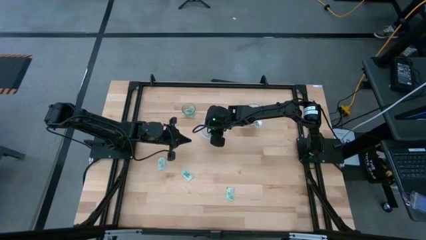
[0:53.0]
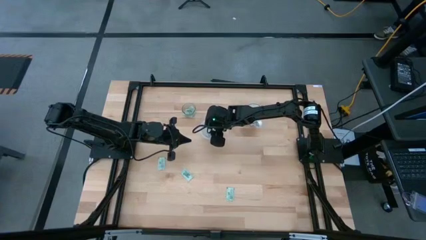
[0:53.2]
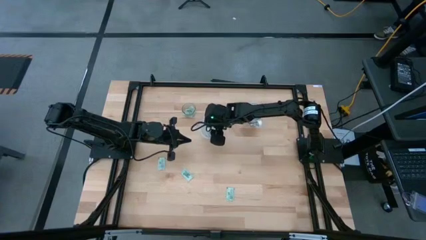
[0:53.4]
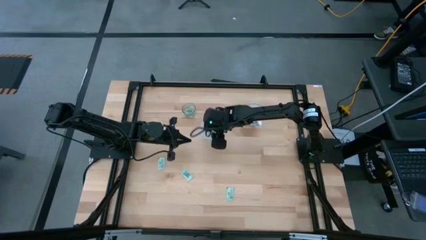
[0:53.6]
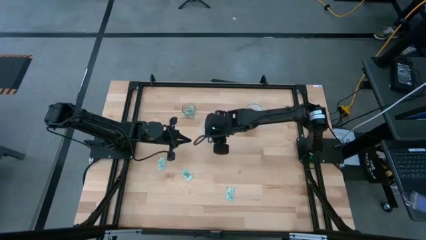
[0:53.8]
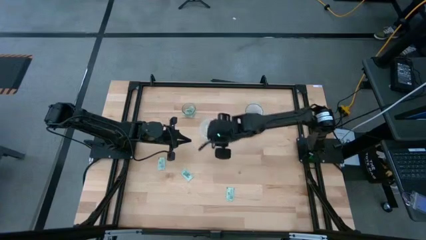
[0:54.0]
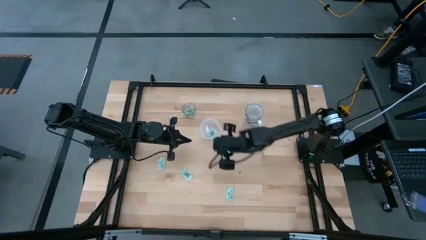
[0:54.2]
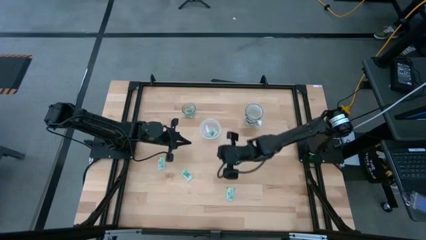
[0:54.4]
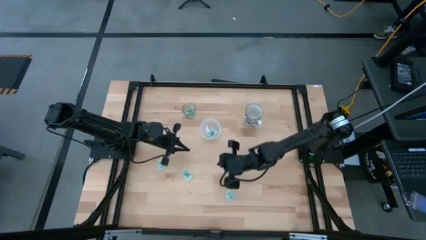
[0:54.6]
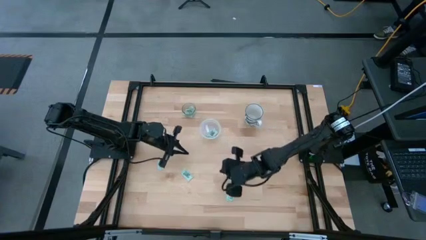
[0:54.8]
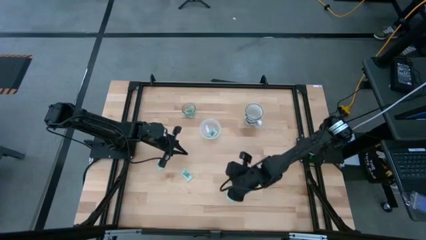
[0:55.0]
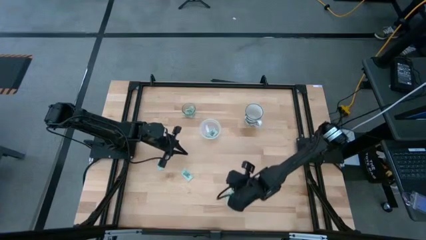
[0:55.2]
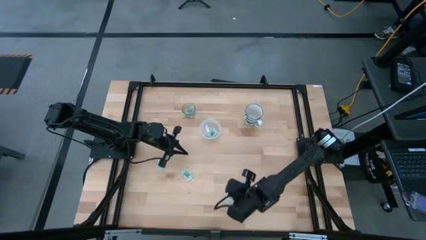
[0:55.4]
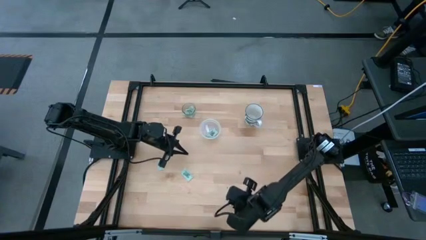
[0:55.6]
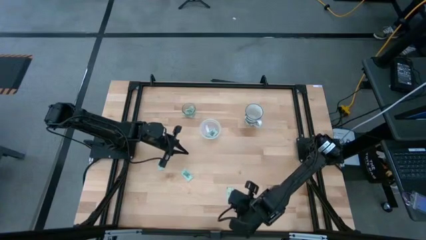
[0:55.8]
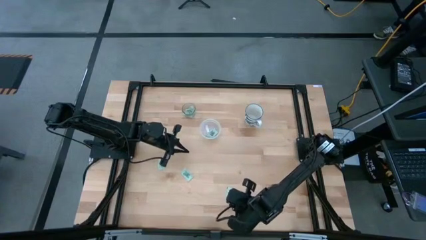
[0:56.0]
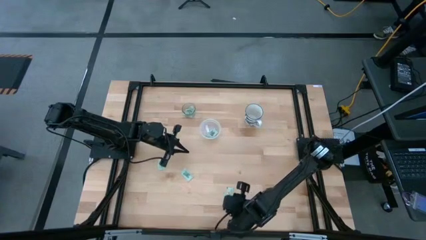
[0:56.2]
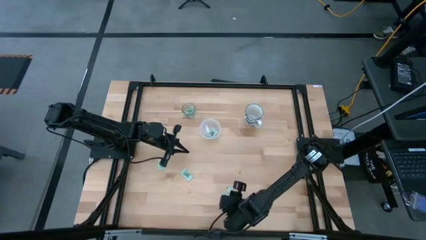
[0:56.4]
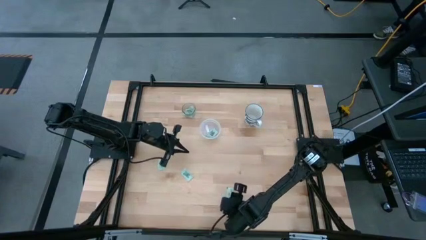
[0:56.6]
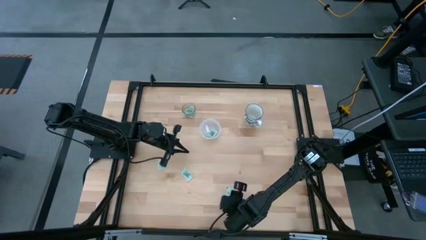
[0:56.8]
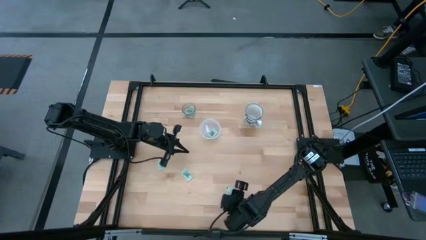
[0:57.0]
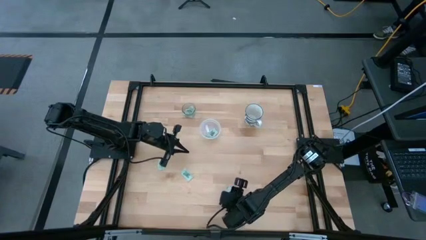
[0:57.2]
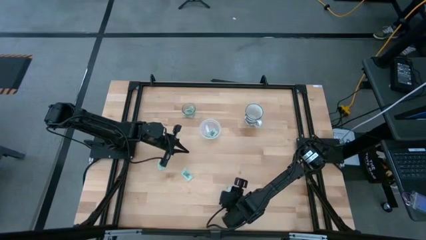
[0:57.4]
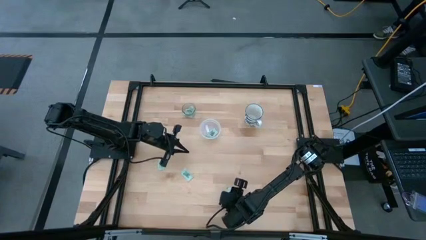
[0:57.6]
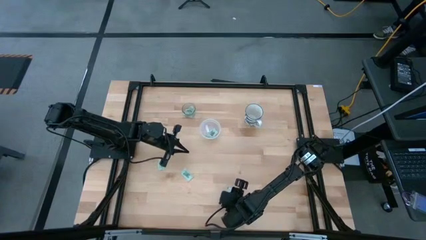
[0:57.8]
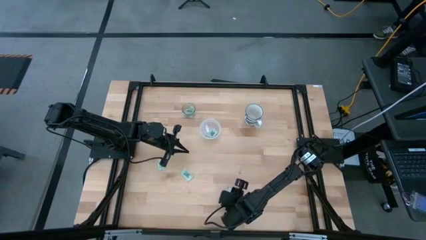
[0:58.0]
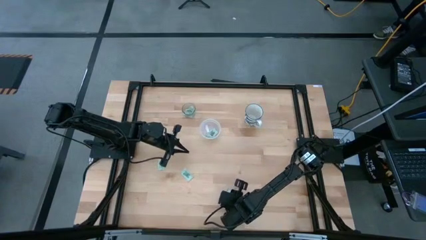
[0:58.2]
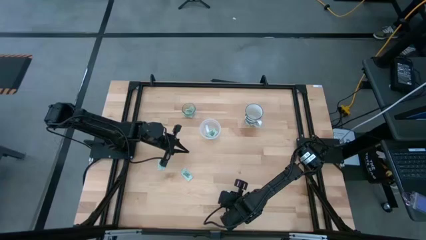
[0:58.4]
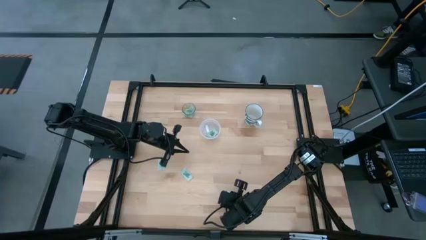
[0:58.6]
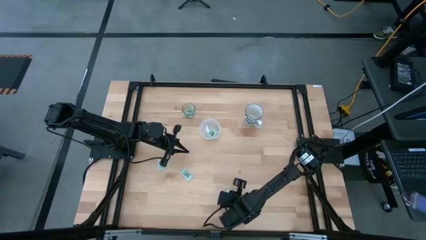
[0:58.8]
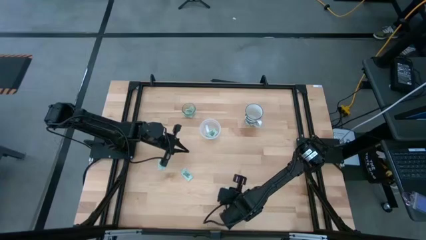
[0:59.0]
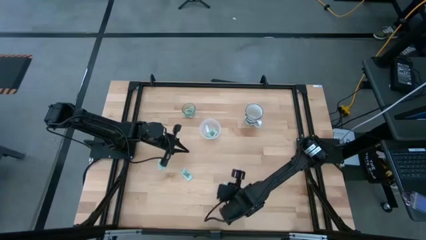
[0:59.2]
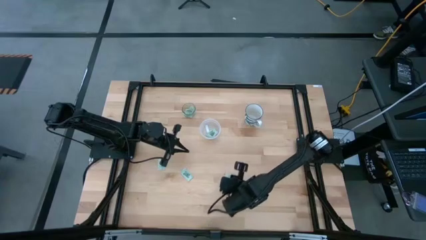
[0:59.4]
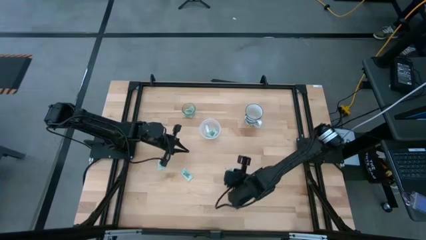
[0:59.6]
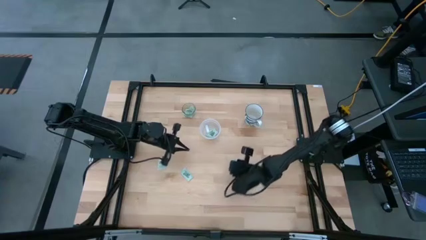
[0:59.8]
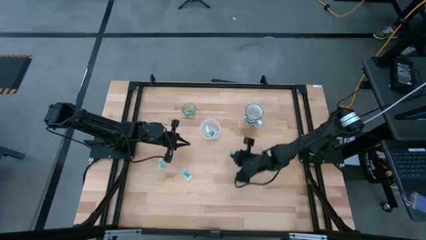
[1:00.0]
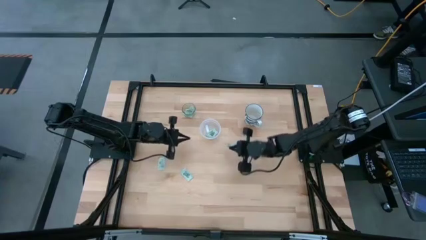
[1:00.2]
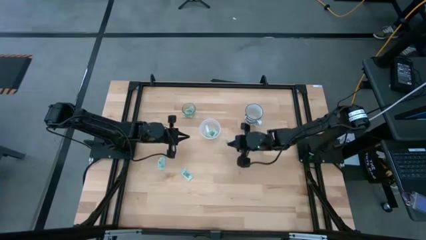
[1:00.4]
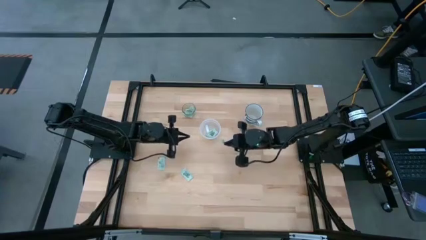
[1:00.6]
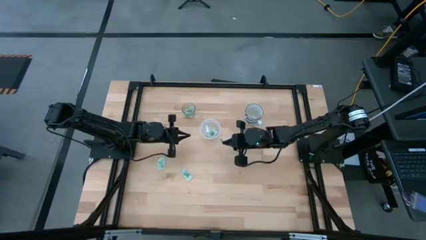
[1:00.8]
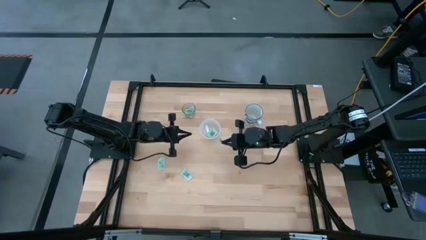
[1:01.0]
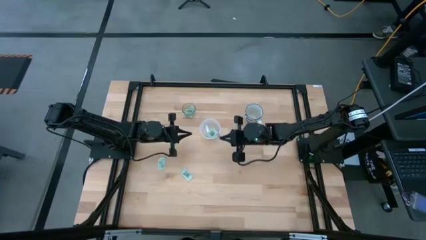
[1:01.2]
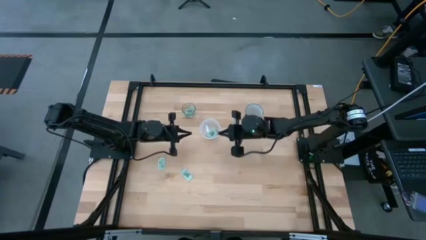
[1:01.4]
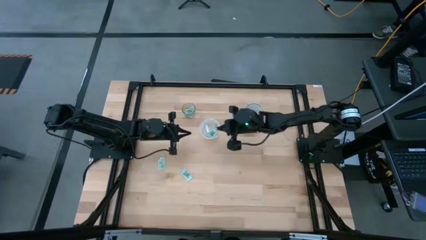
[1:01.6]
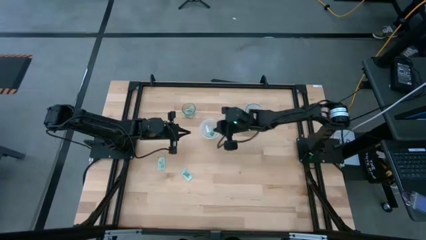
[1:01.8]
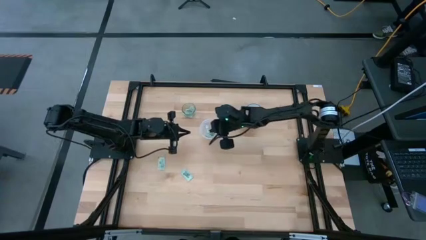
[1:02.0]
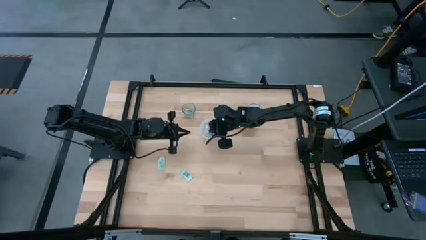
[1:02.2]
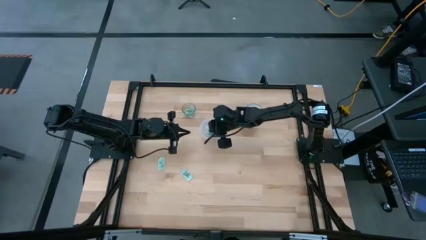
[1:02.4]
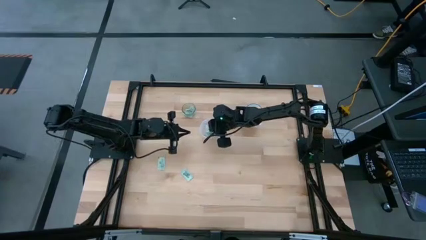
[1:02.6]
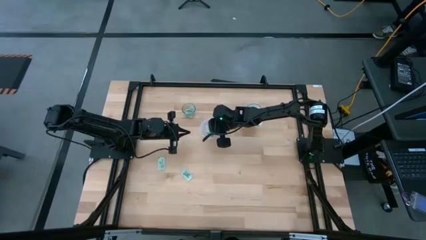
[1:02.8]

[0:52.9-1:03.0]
Task: Pick and place Stevia / Truvia into bins
Put the stevia packet into the transparent container
